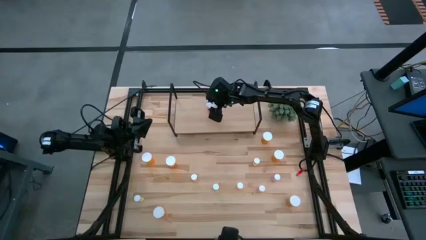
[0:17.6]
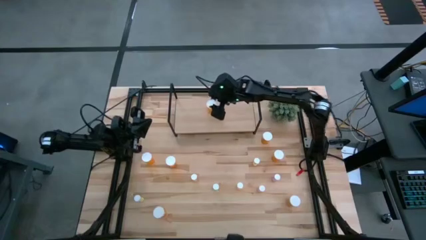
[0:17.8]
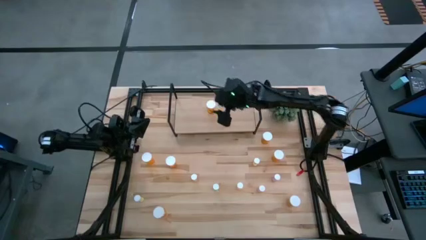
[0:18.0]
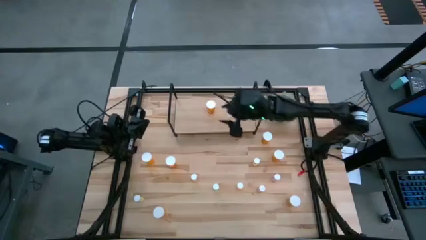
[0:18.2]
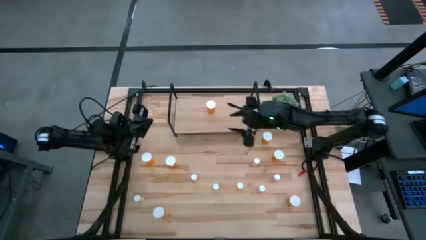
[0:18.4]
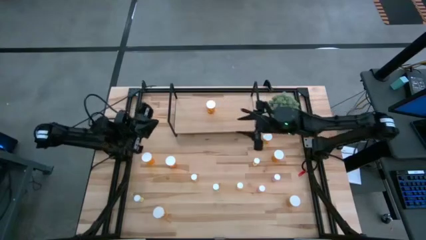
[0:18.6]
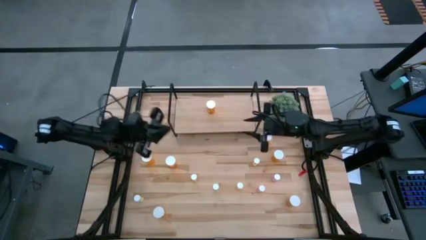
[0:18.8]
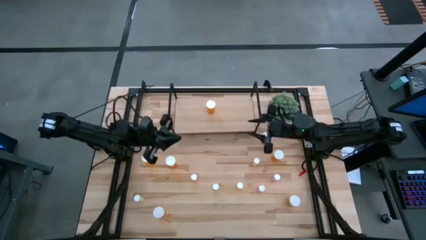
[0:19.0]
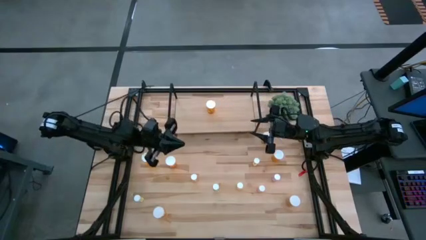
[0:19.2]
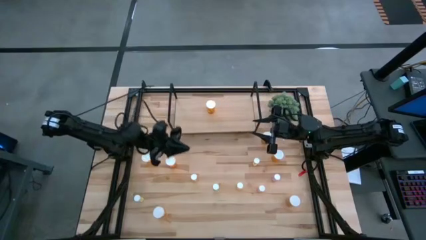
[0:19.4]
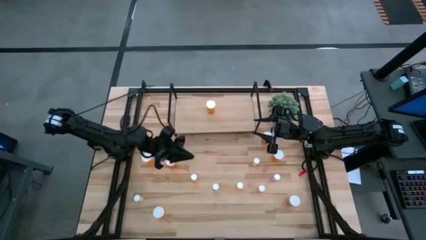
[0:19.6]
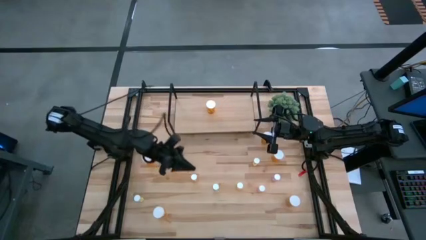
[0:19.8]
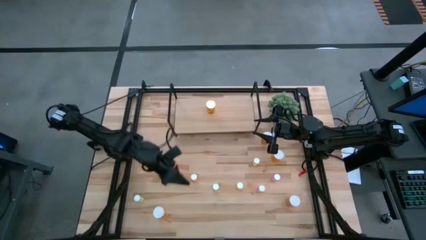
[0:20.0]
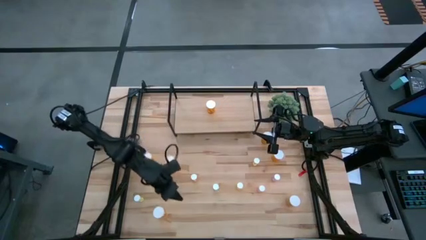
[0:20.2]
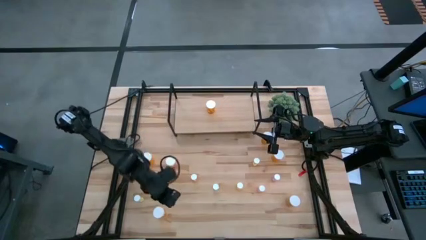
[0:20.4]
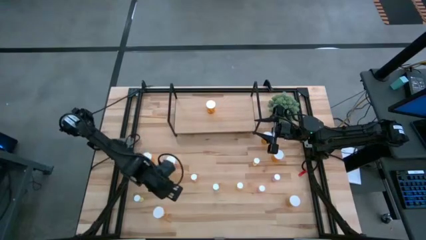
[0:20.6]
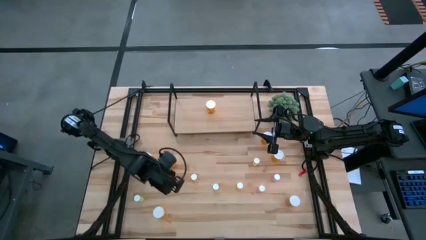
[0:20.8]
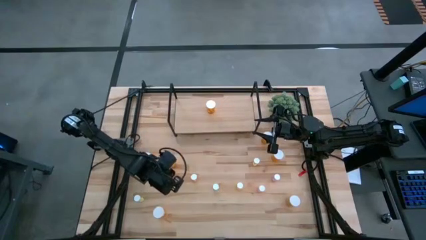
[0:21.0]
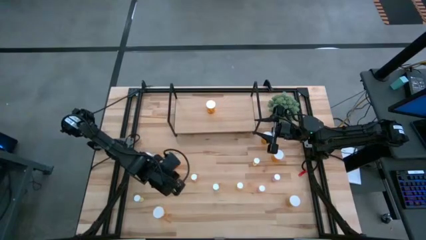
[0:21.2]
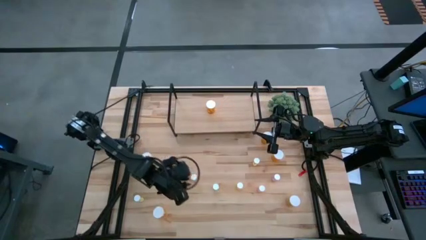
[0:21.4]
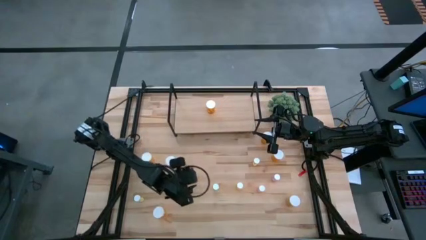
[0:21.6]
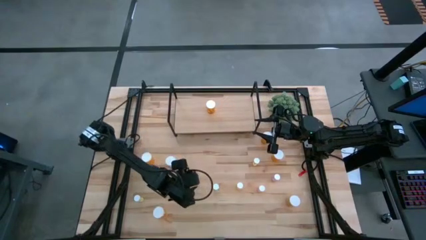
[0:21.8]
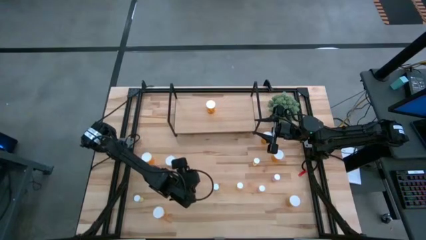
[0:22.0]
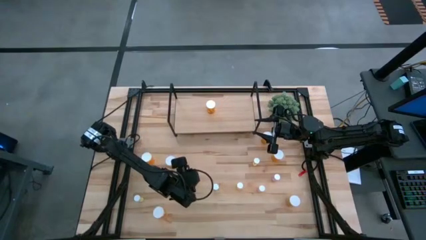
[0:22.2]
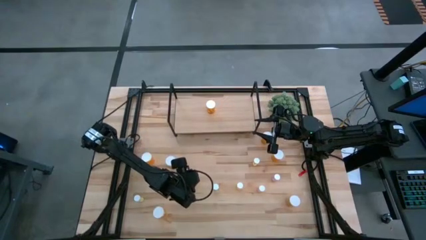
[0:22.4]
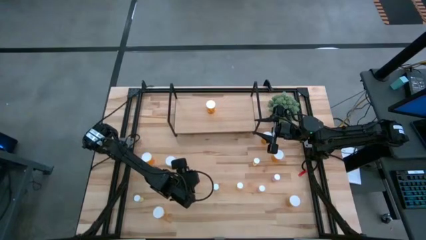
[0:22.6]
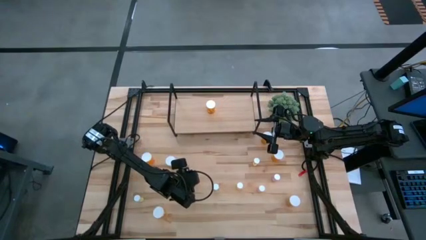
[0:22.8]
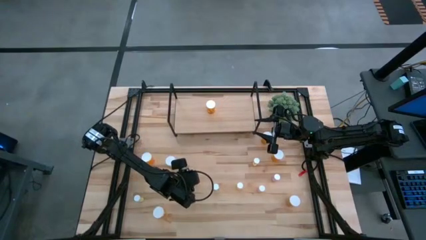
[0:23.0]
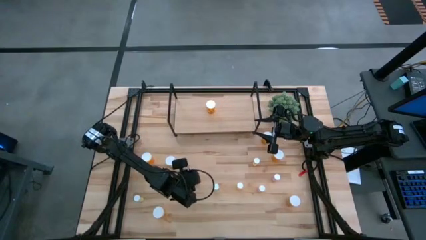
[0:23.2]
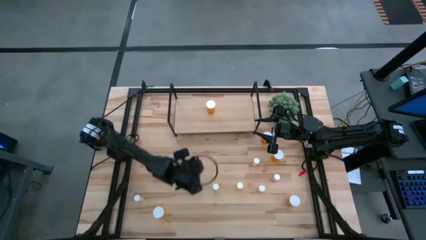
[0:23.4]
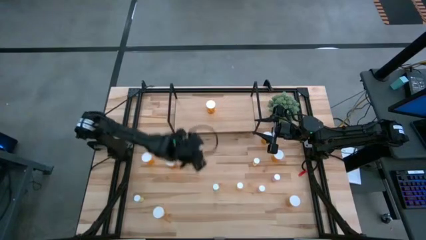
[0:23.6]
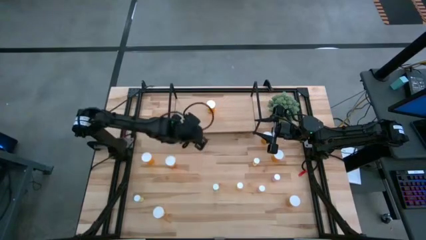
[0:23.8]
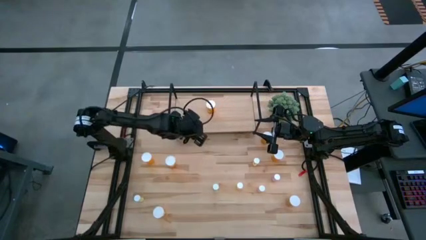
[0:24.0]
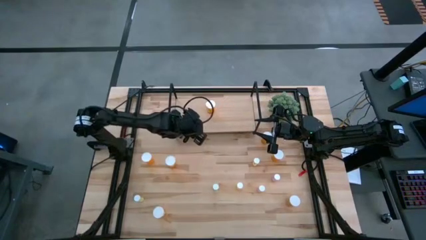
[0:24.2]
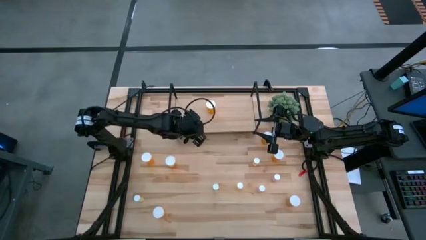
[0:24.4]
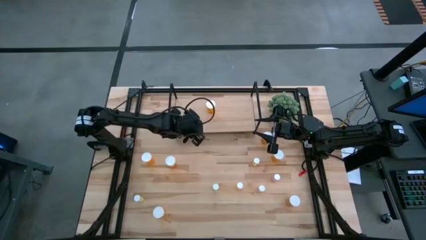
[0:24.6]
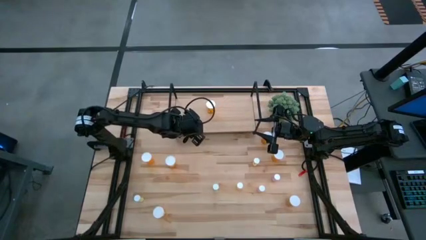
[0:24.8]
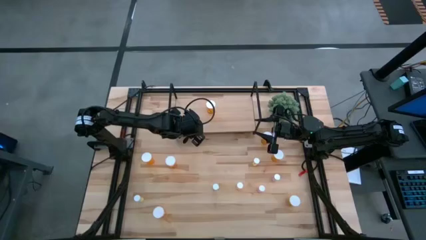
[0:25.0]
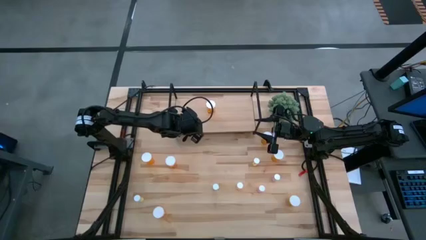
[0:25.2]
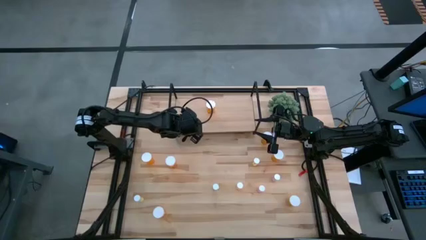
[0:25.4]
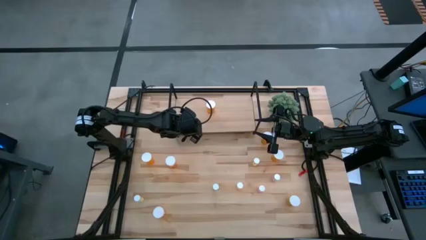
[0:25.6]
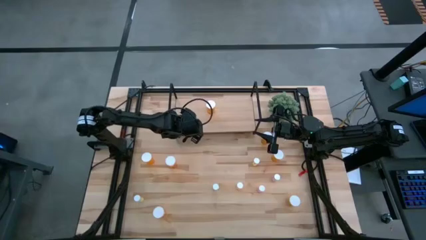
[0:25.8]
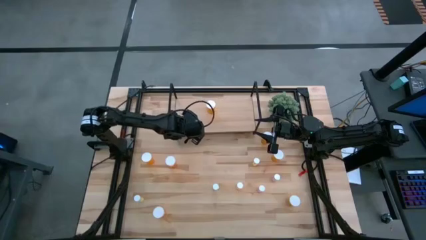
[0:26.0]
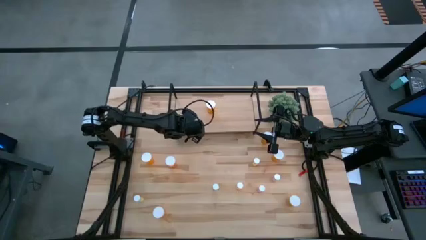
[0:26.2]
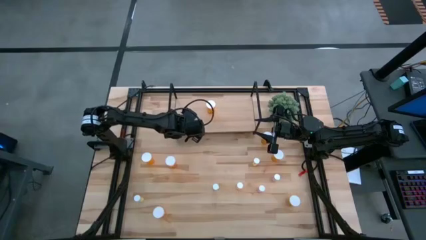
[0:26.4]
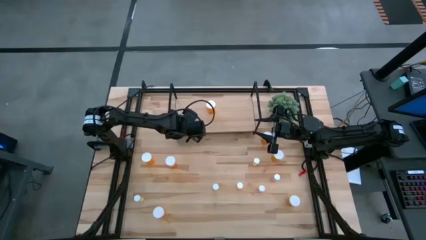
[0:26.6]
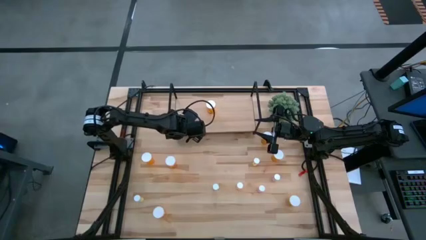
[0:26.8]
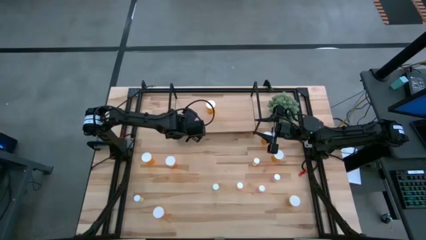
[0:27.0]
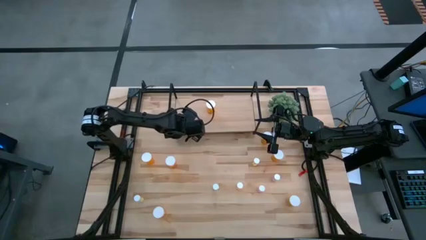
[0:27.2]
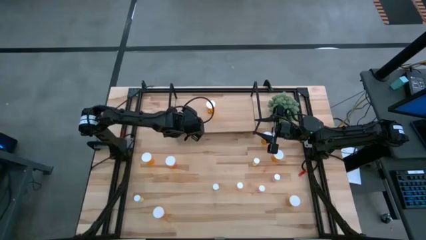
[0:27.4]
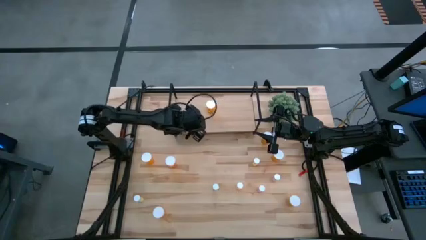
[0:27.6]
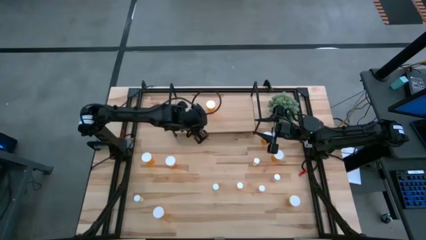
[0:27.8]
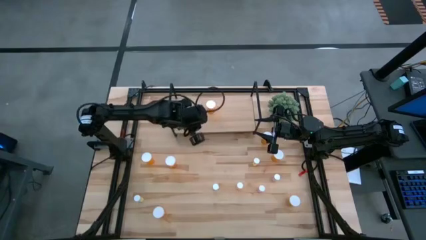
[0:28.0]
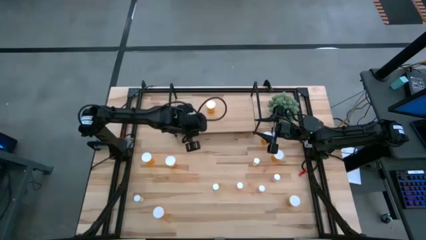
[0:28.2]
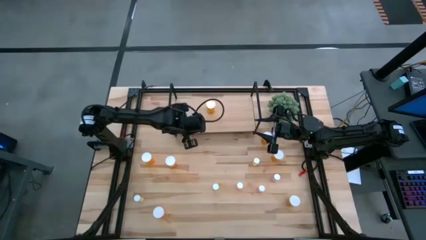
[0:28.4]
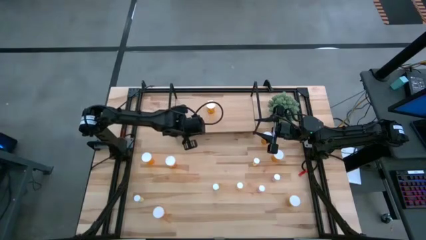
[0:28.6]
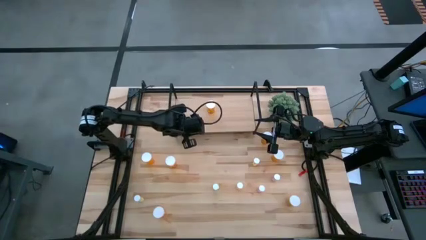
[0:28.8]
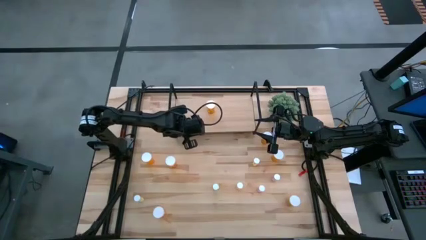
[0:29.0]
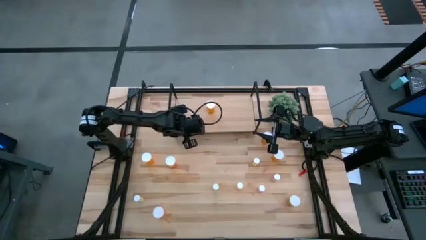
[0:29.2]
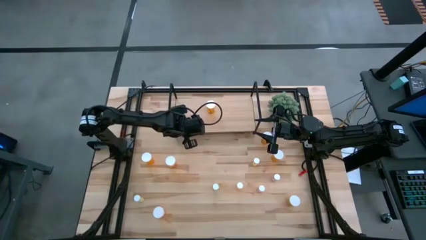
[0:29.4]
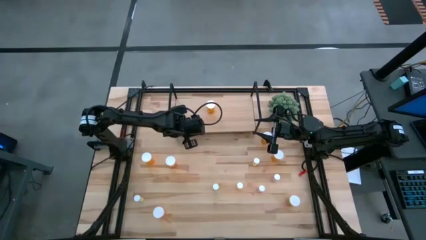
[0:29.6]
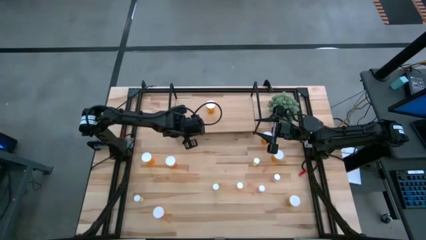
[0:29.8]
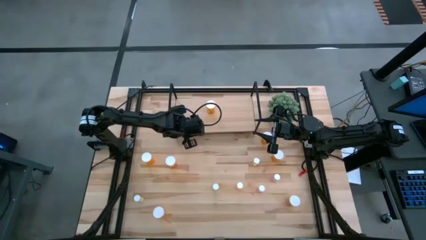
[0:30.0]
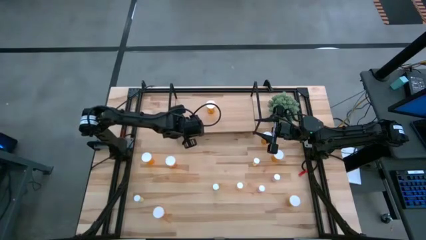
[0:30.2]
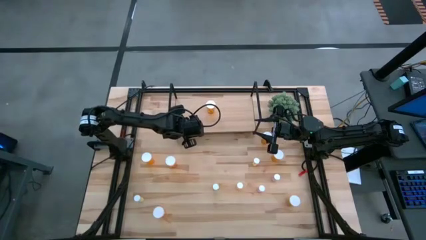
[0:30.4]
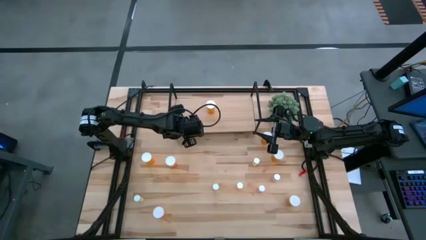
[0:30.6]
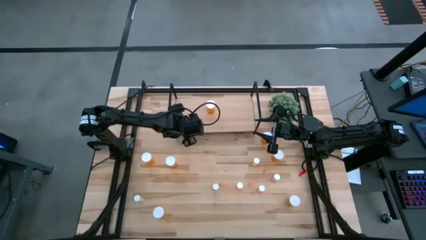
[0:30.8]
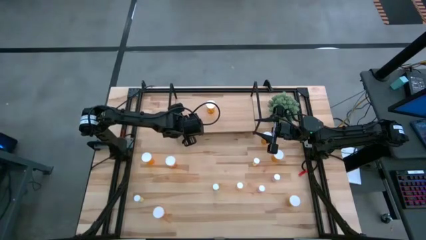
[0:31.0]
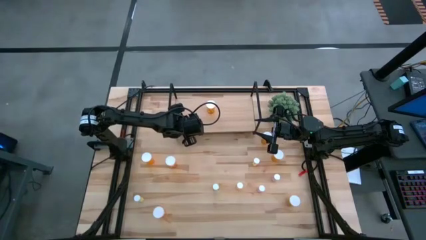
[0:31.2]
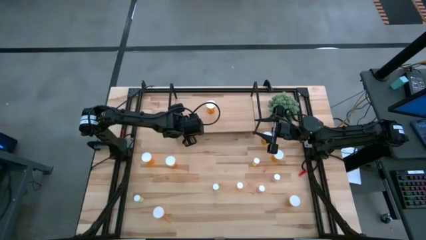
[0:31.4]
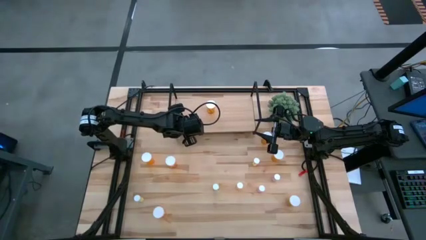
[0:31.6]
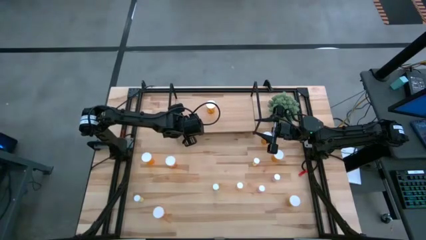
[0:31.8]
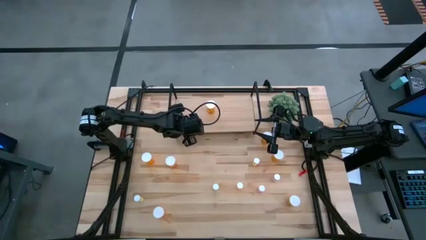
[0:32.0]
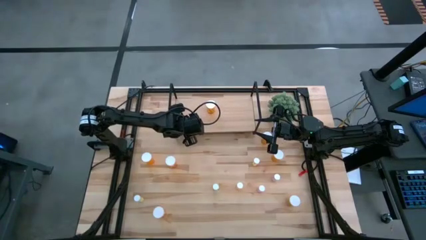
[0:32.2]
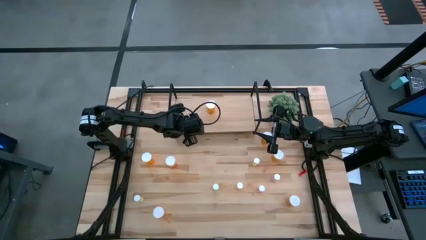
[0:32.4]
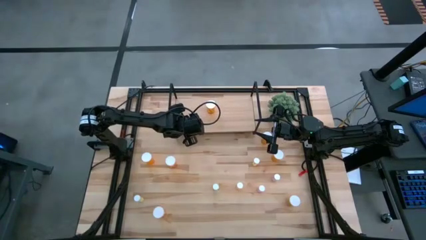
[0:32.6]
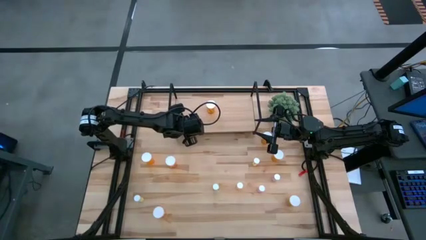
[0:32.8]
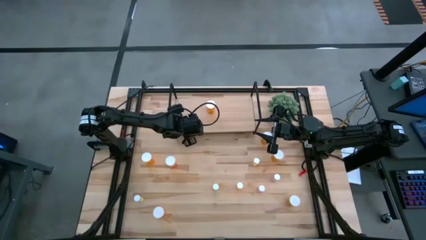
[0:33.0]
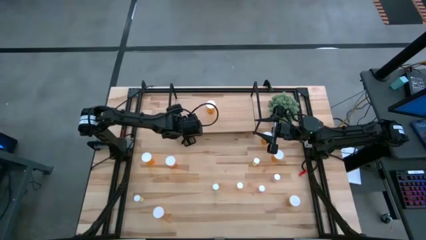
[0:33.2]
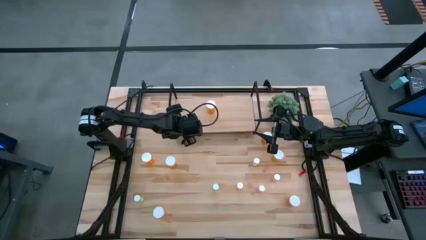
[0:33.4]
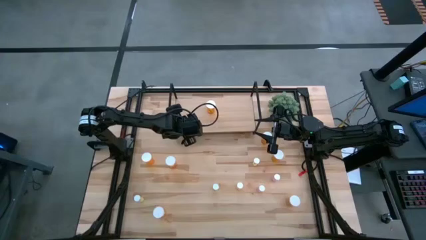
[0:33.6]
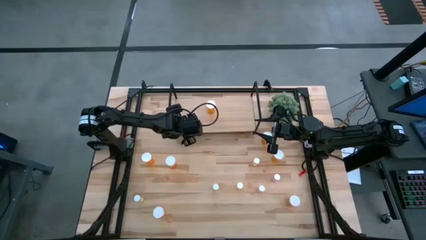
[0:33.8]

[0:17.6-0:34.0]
Task: Pick and place medicine bottles onto shelf by color
Put the small yellow pill bottle on the shelf
